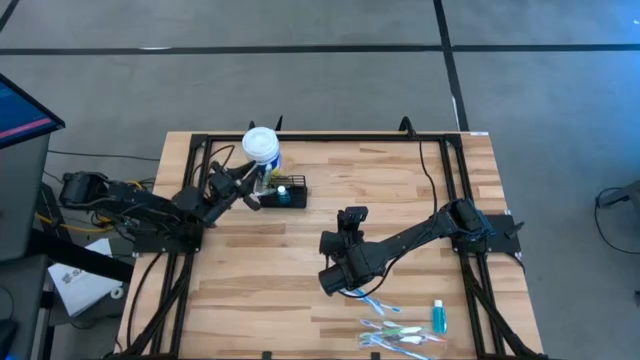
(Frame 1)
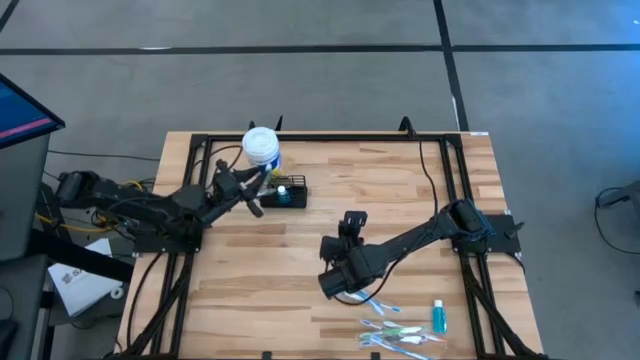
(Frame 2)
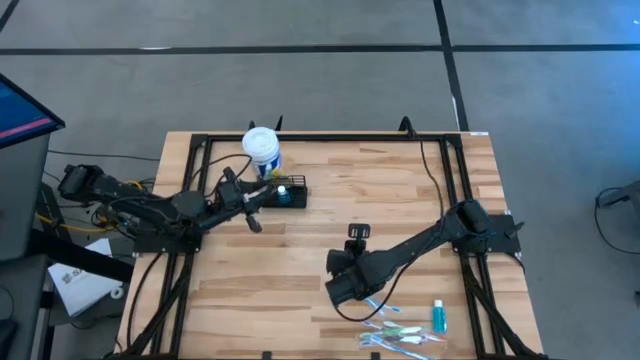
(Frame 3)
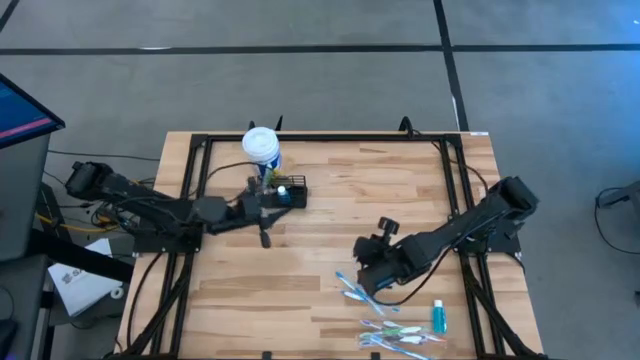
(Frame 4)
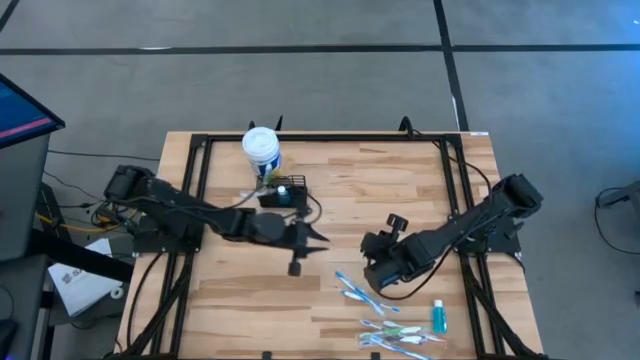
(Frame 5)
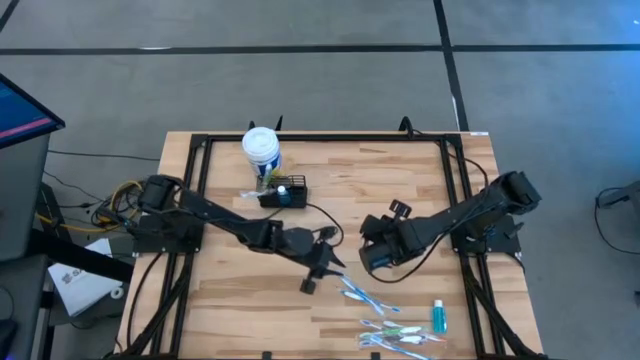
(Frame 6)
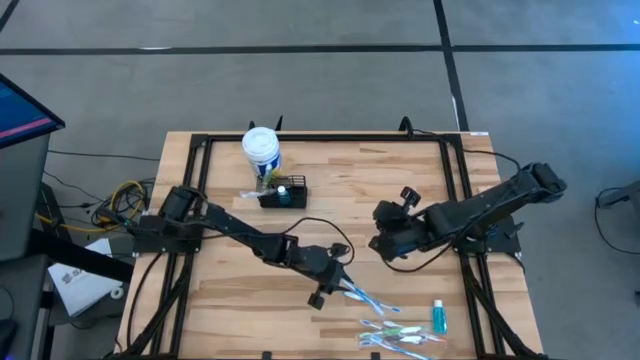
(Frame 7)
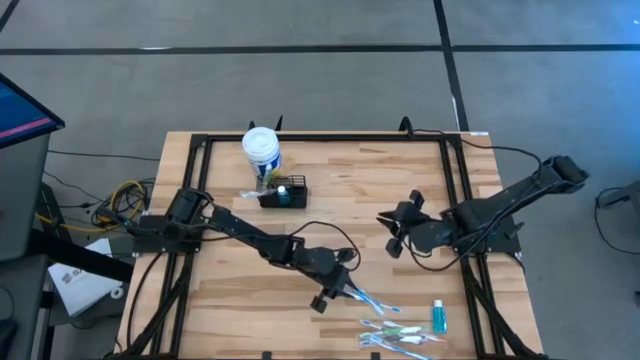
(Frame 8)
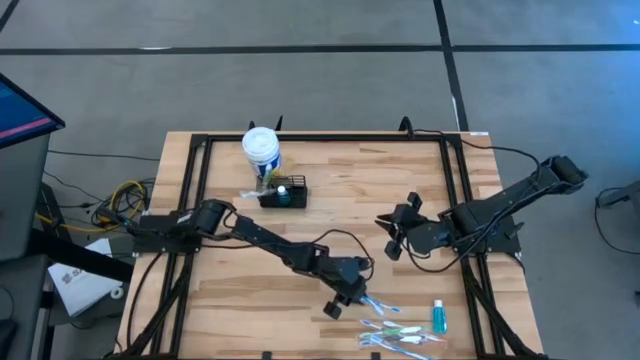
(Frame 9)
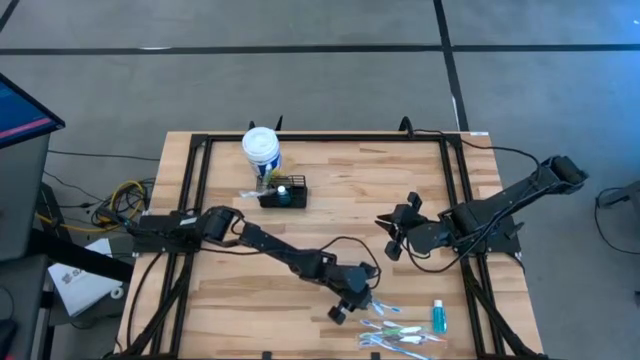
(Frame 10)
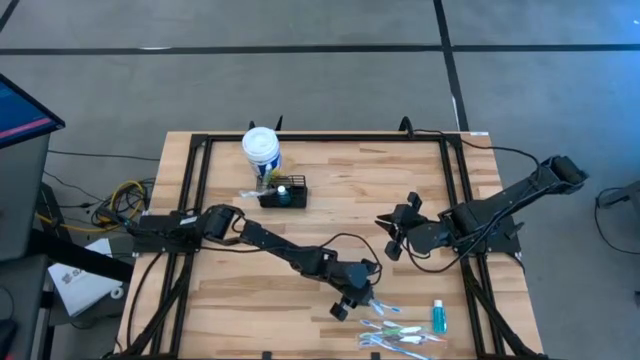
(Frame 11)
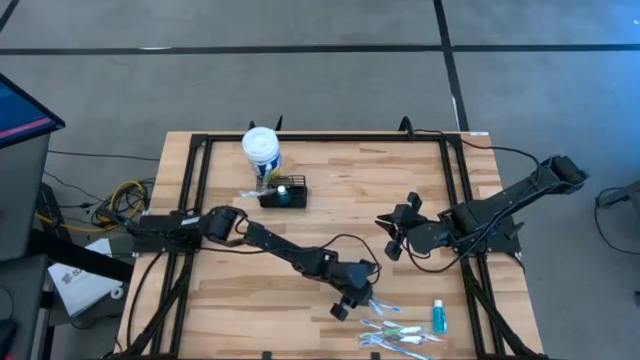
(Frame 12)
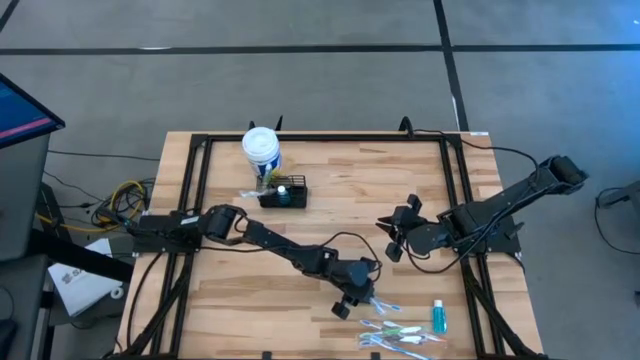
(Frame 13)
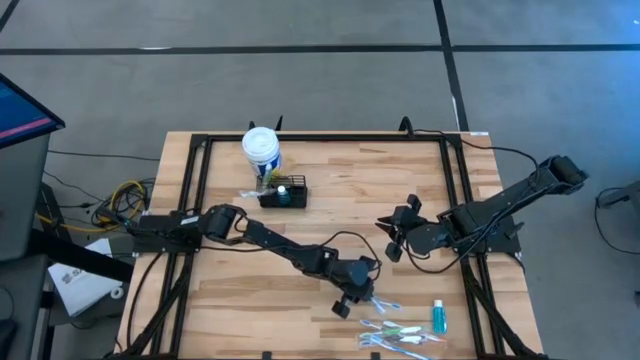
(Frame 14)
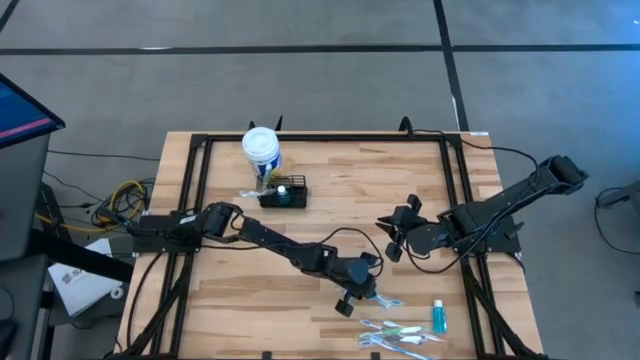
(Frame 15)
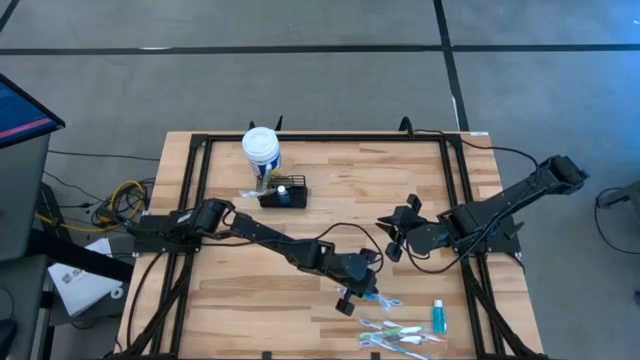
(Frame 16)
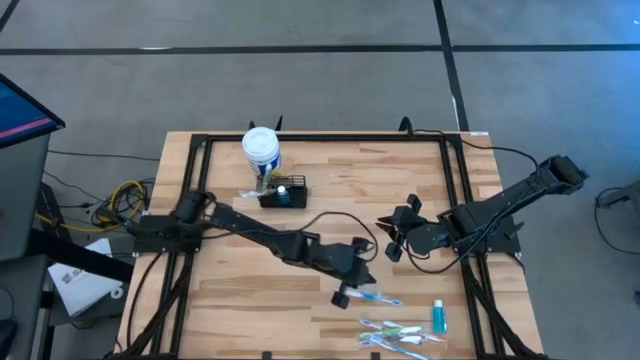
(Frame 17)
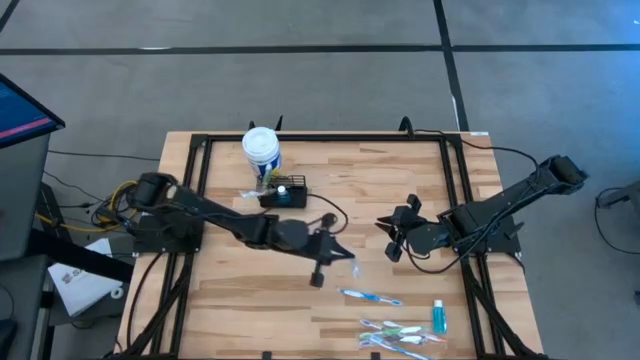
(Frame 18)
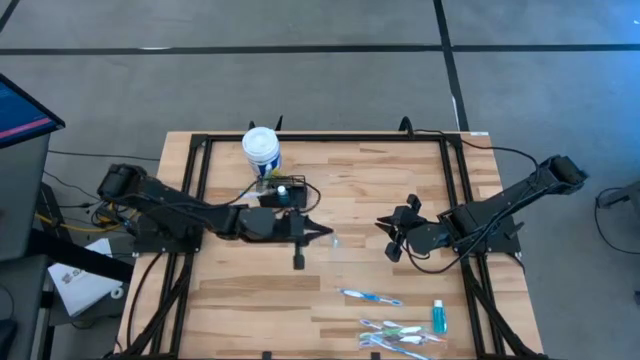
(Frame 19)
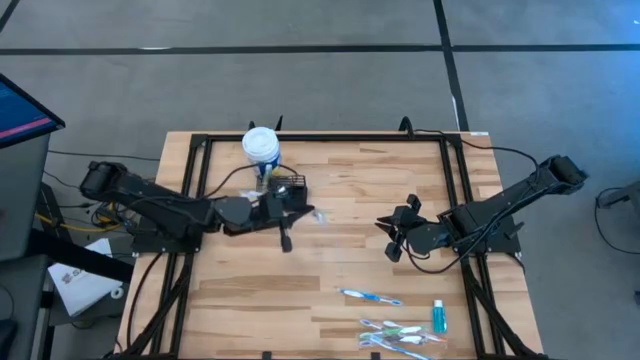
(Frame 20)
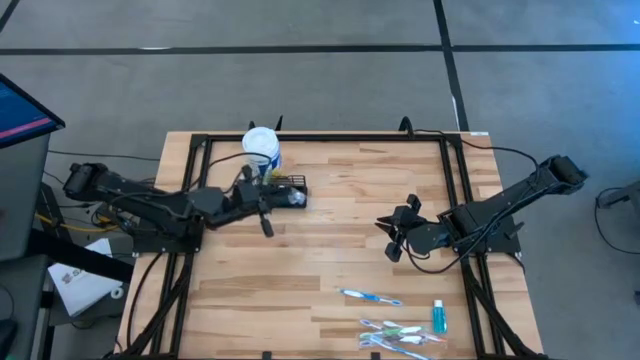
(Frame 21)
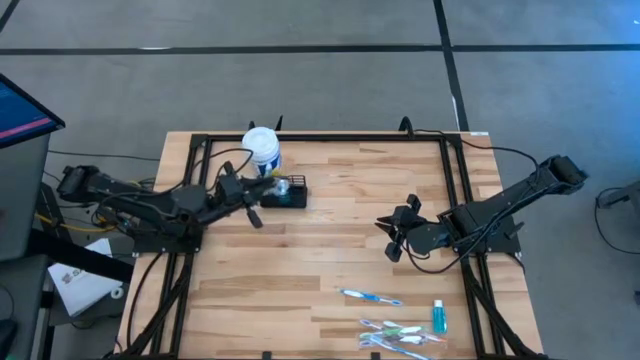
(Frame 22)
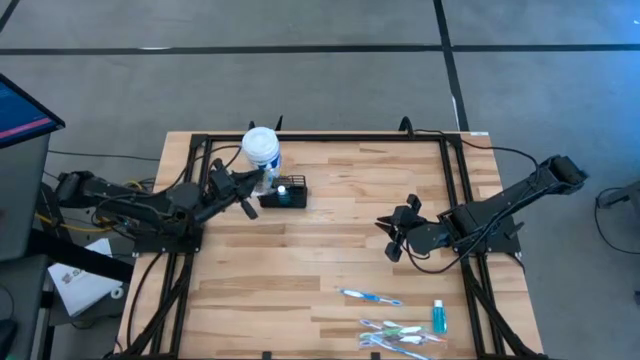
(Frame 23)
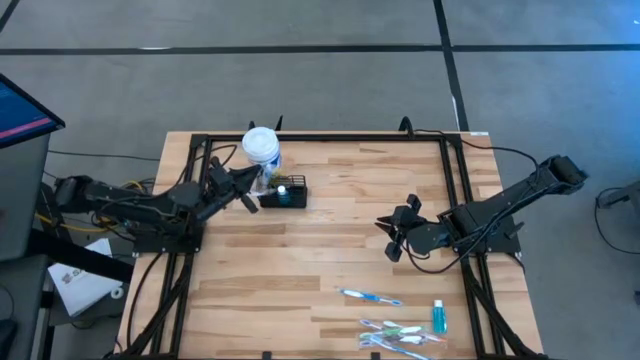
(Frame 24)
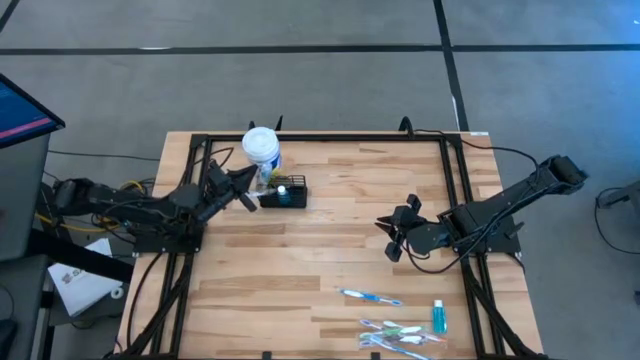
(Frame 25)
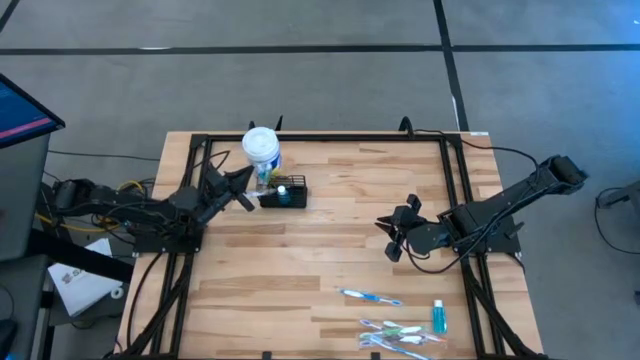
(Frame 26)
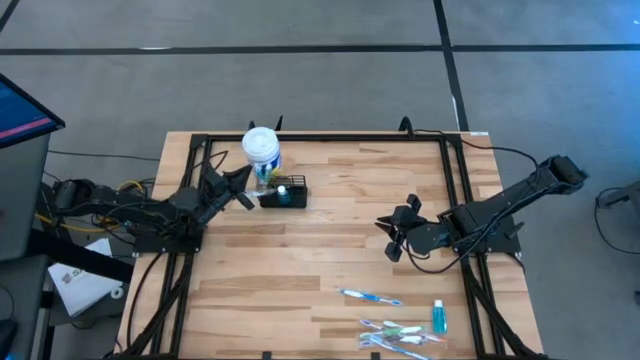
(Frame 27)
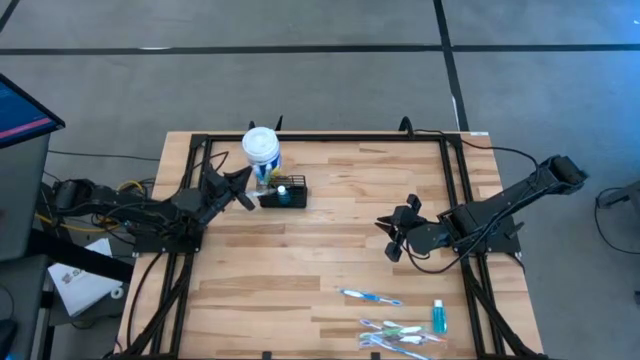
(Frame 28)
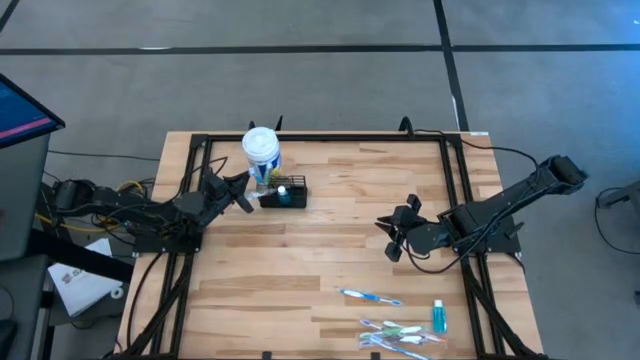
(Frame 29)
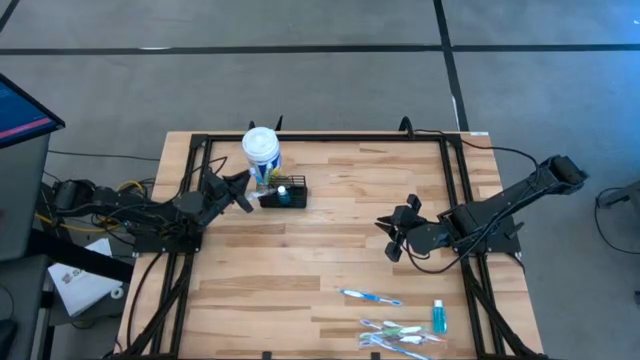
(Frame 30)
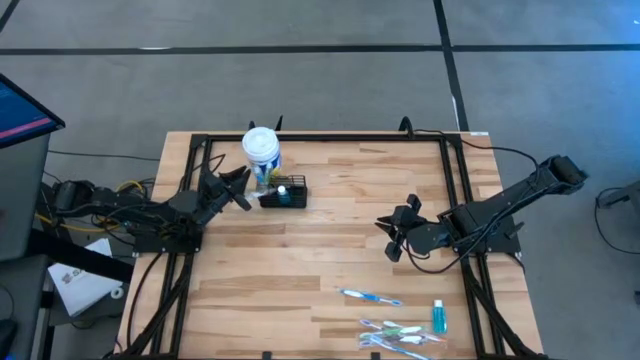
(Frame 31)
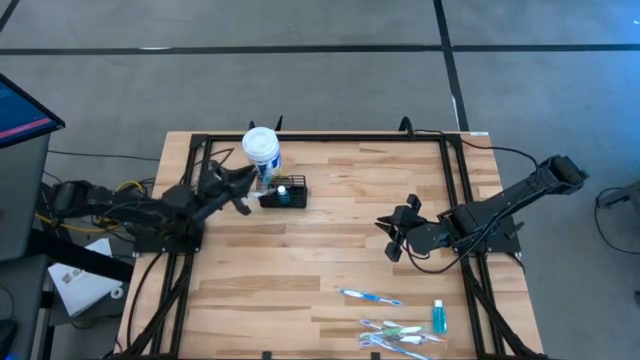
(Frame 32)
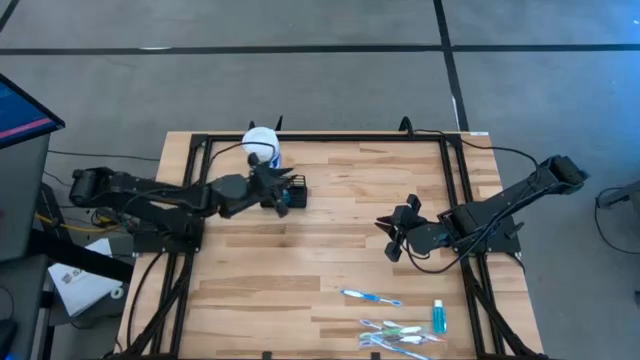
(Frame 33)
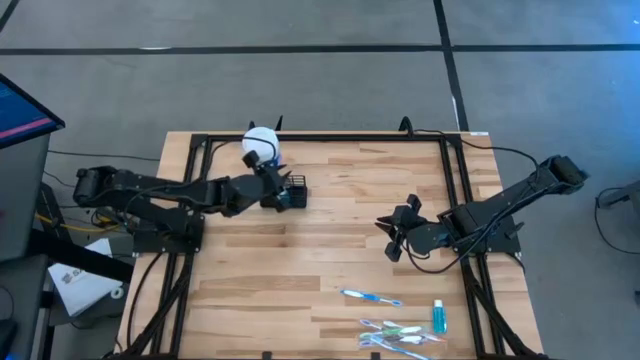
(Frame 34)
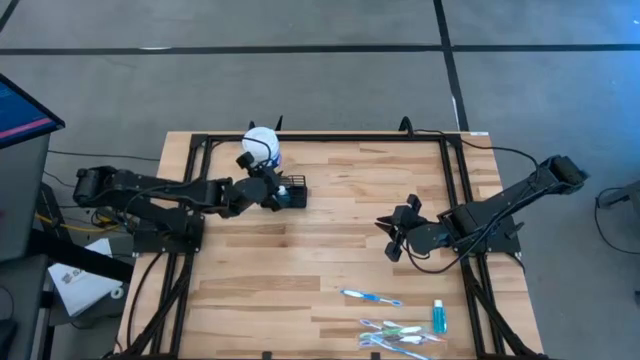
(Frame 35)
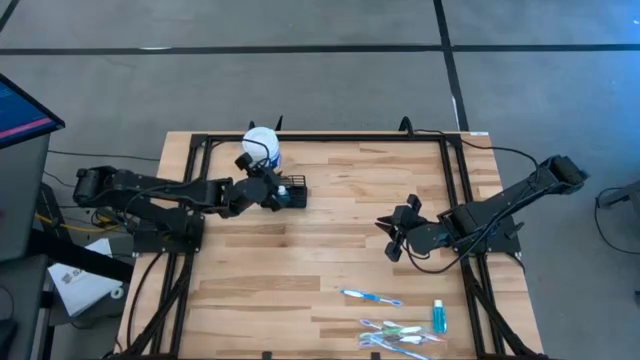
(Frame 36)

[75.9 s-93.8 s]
Task: Pick & Place toothbrushing station
Put the blue toothbrush into the wire organizer

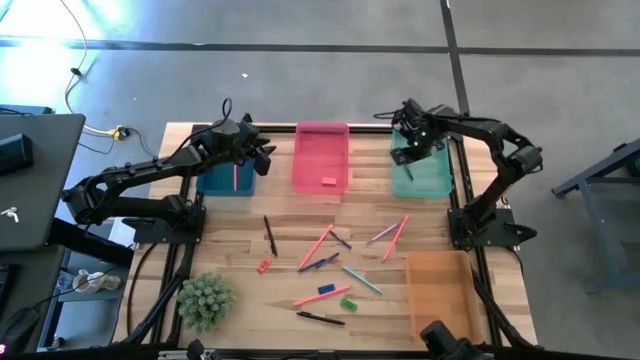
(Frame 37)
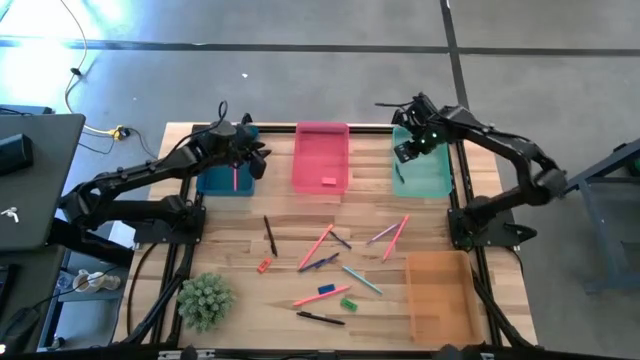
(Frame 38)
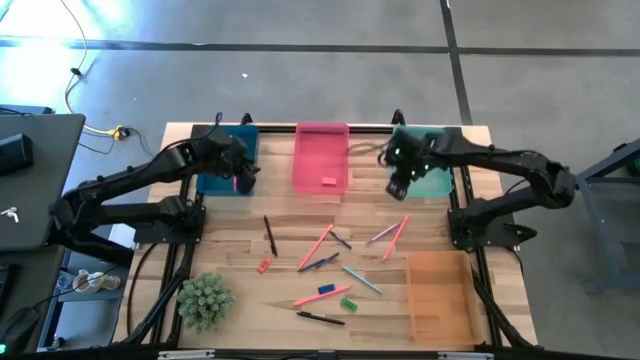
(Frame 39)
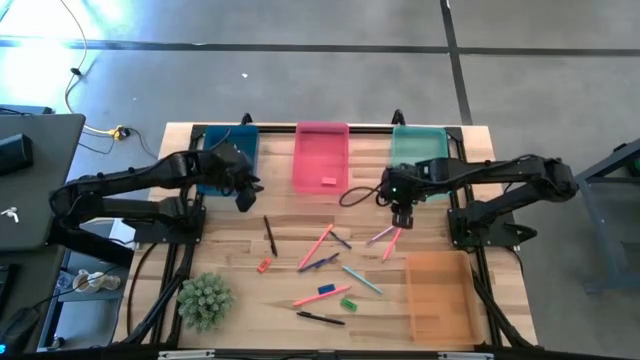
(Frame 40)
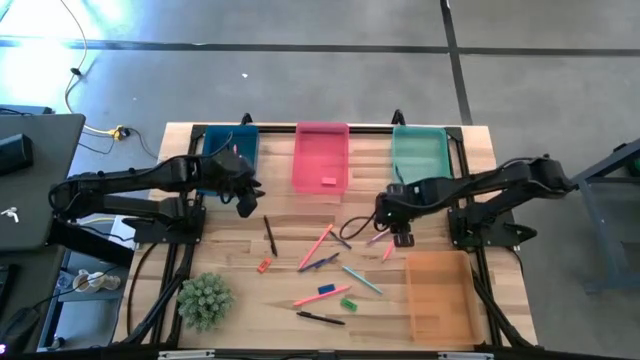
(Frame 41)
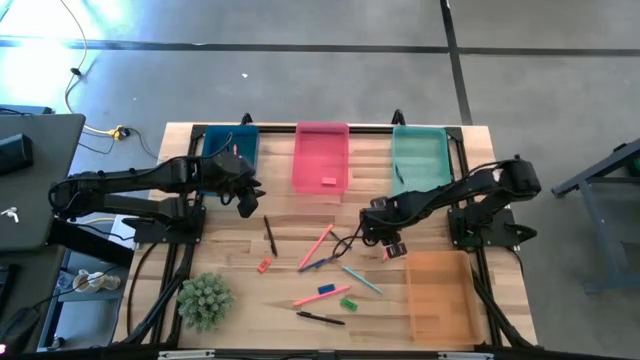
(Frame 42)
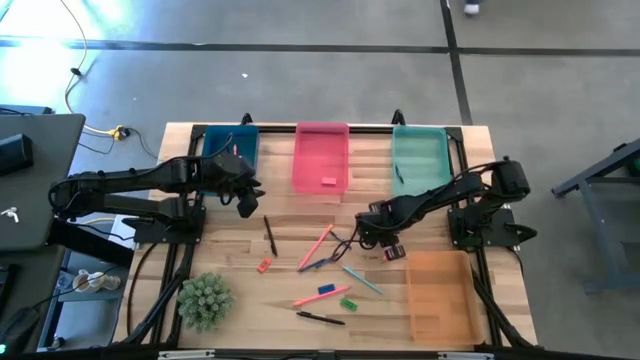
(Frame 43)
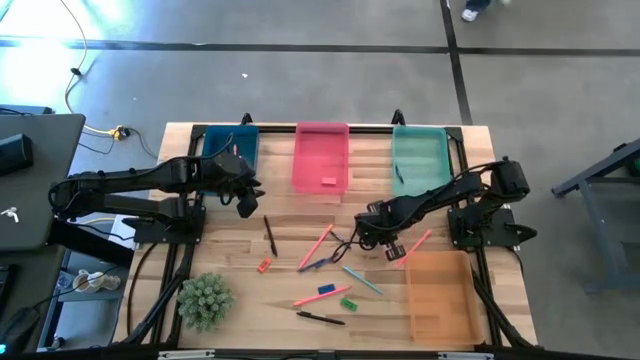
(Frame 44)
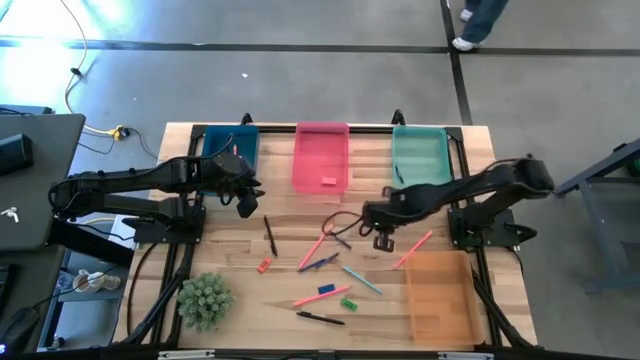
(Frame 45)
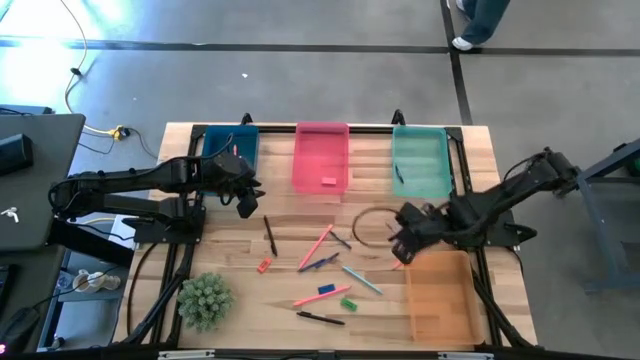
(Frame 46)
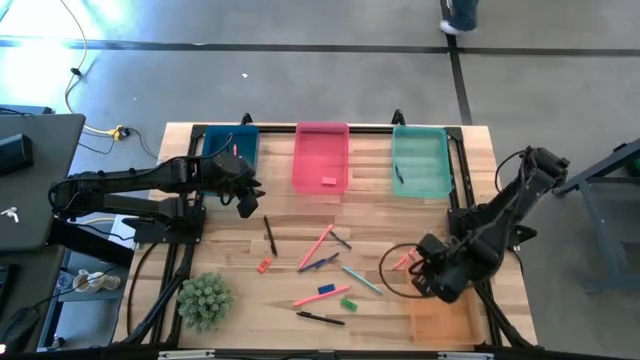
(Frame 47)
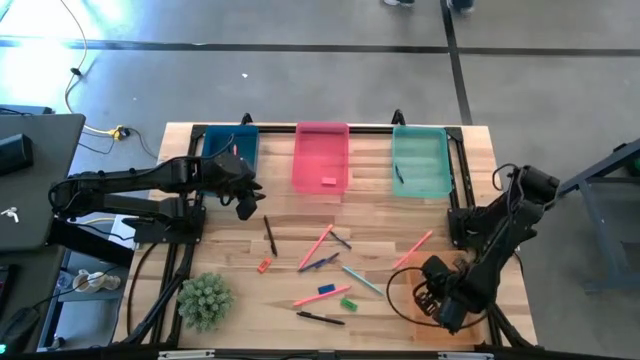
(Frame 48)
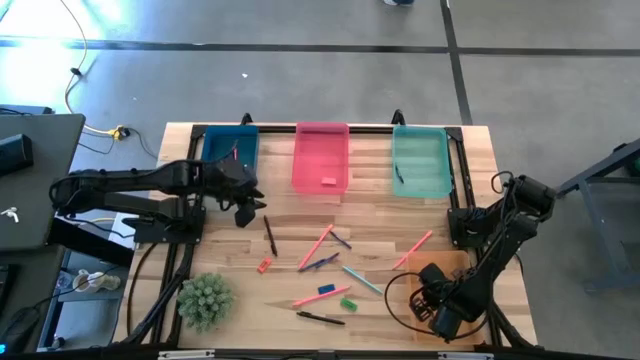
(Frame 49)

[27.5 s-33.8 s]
Task: Sort crayons/erasers/pens/pencils in bins
Put the purple pen into the orange bin
